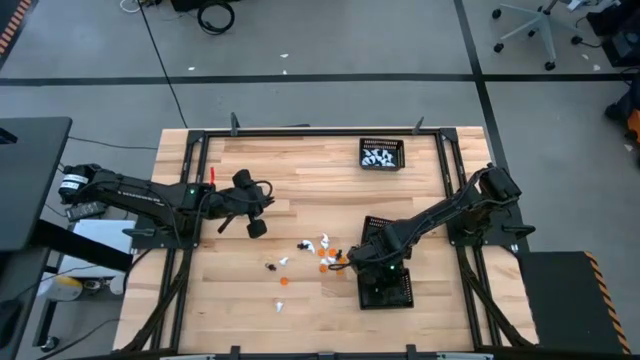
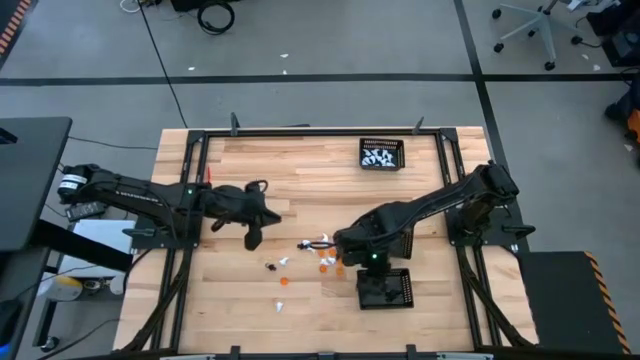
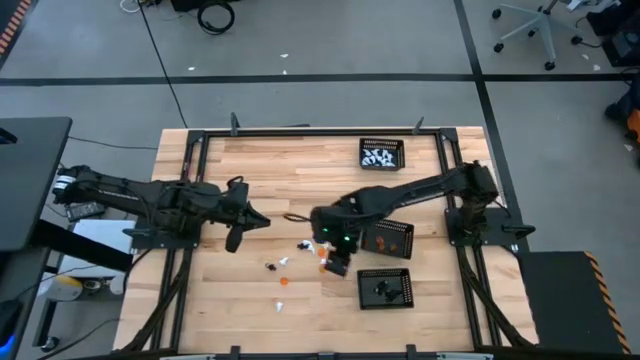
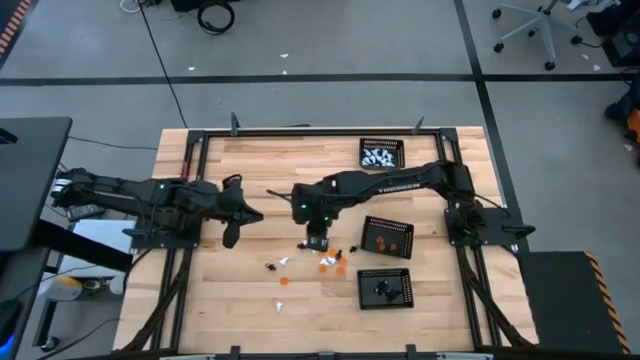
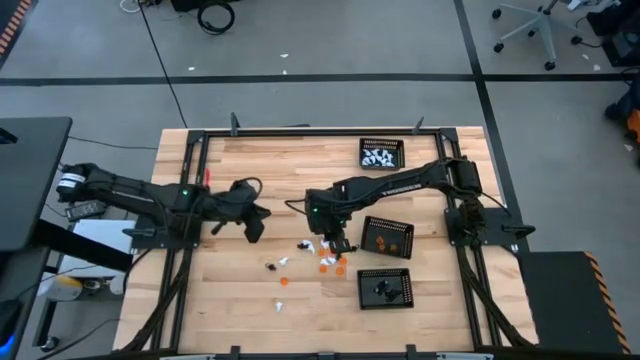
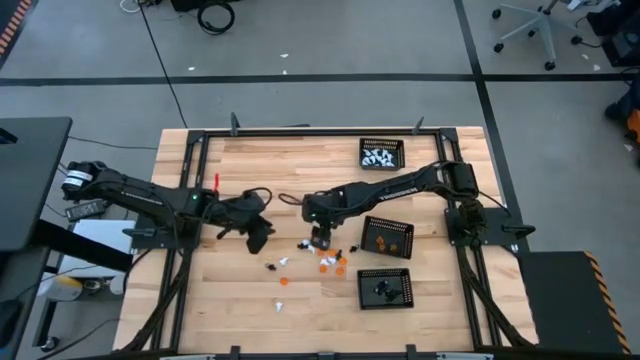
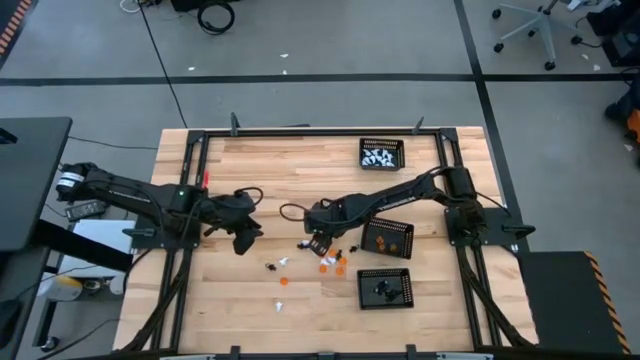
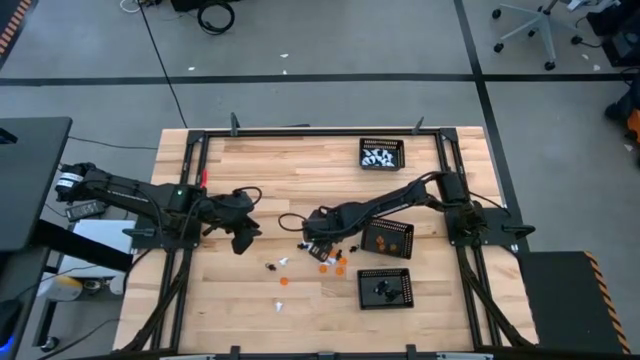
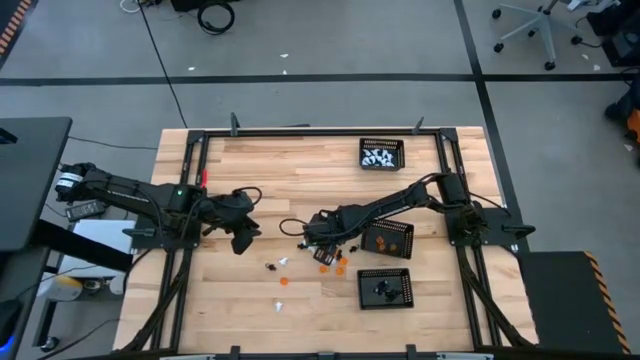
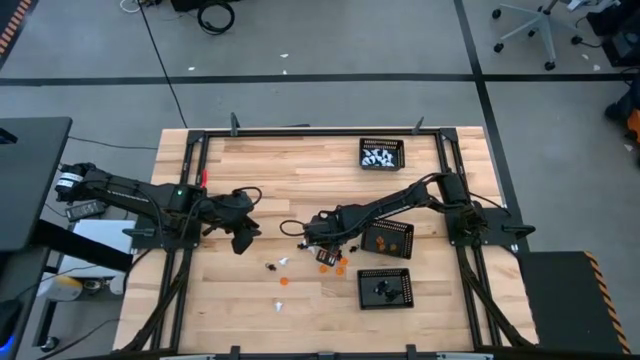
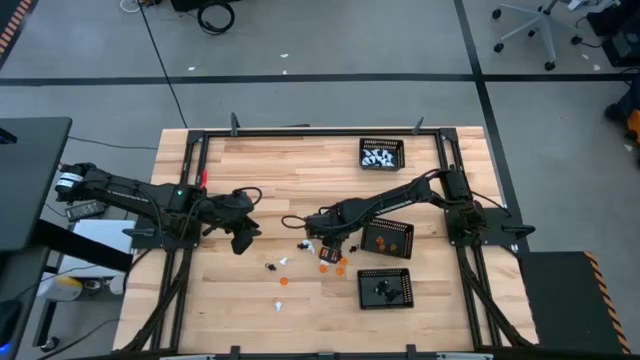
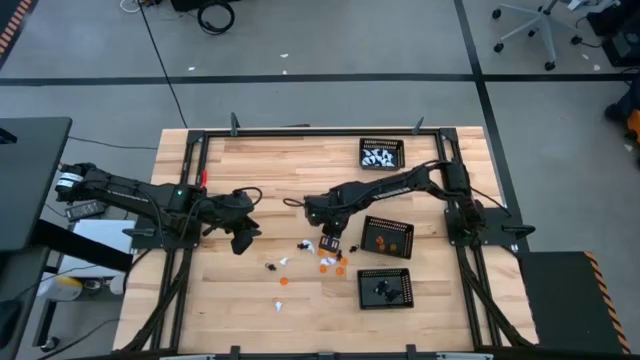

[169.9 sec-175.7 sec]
Task: Sort Halloween decoration
Put the white ghost toy into the top black bin

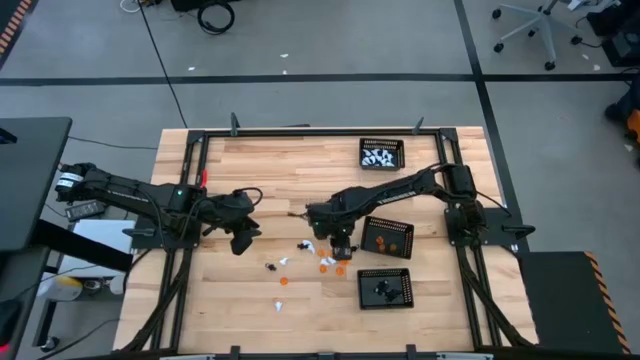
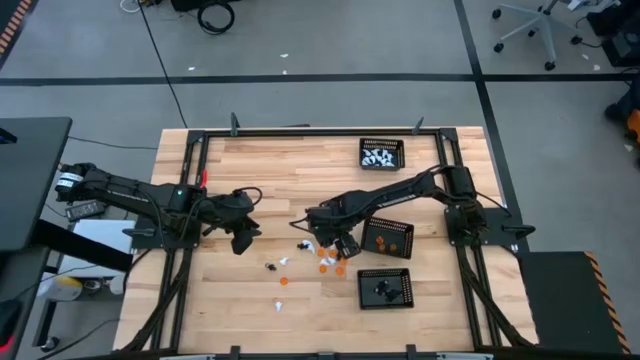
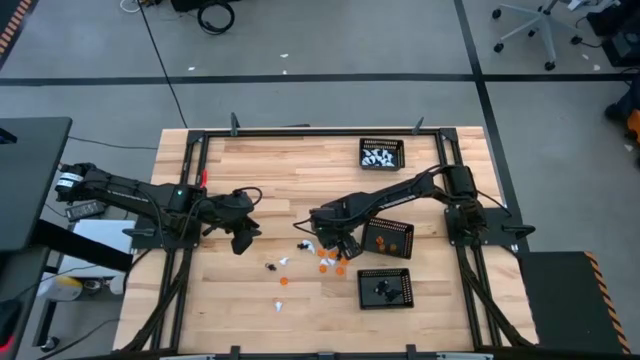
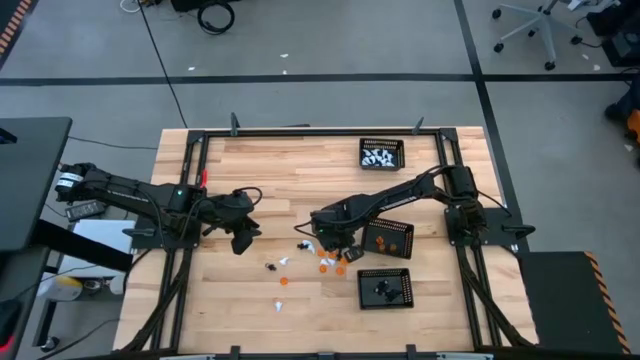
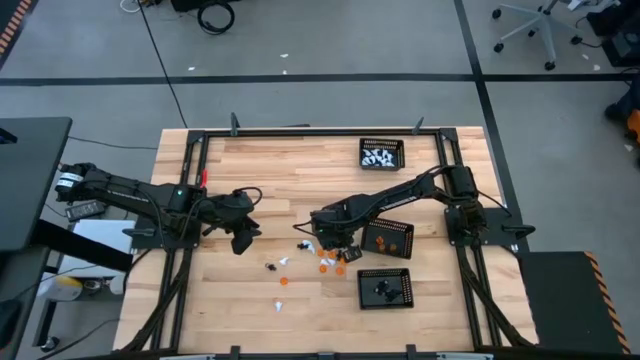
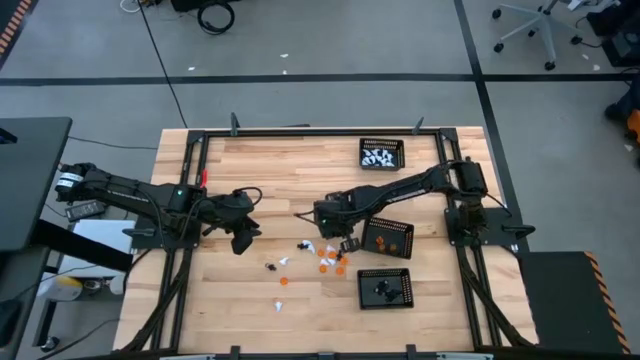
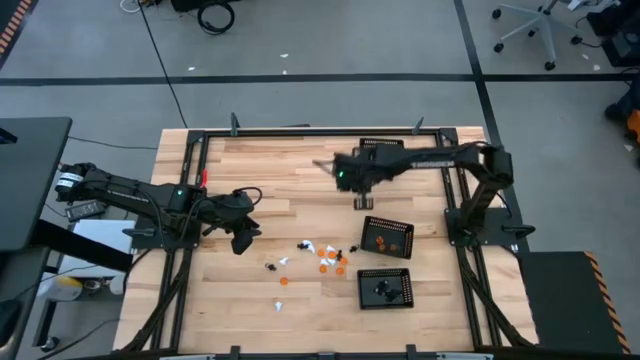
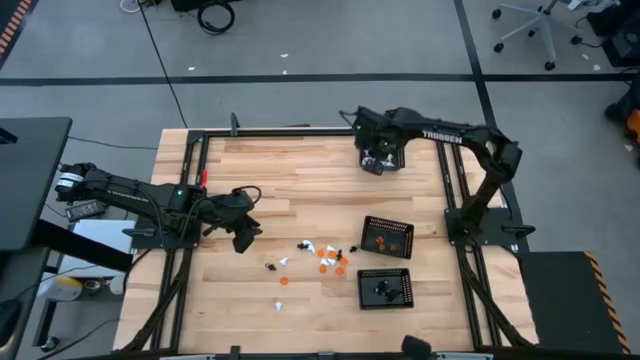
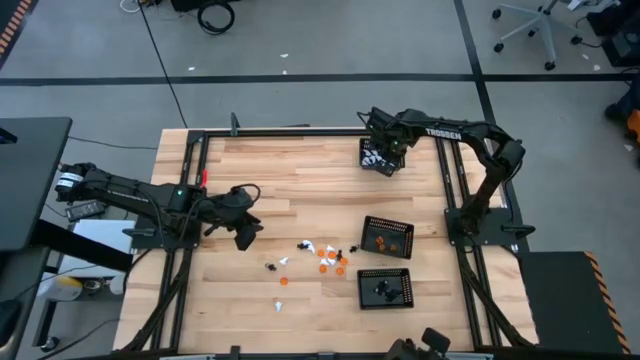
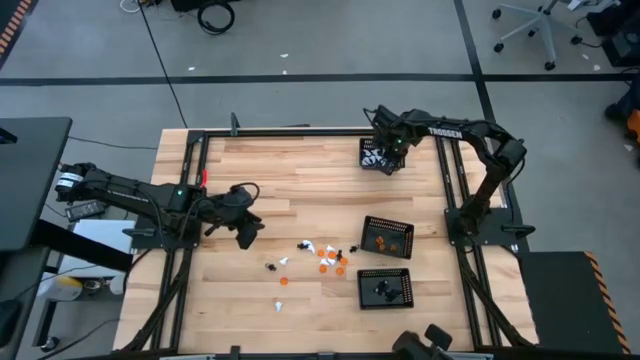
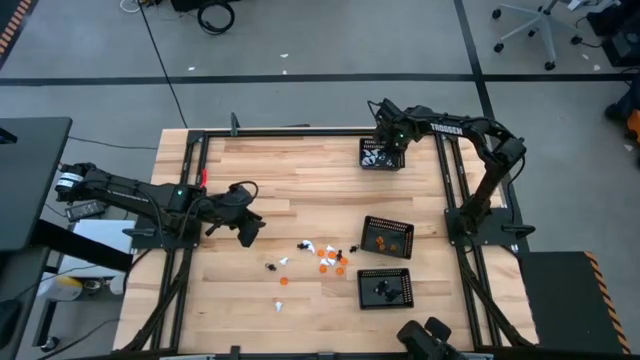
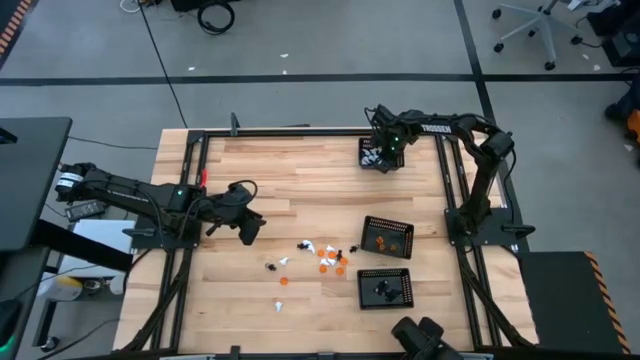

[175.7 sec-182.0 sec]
Put the white ghost toy into the top black bin

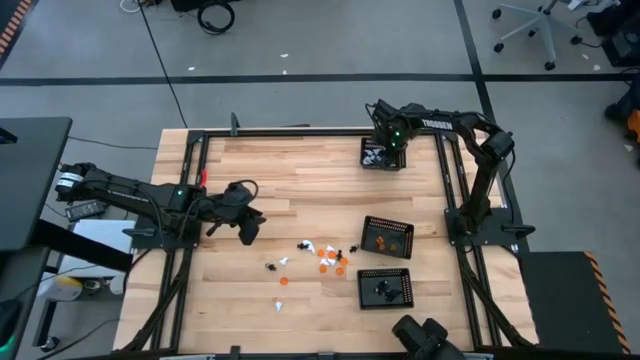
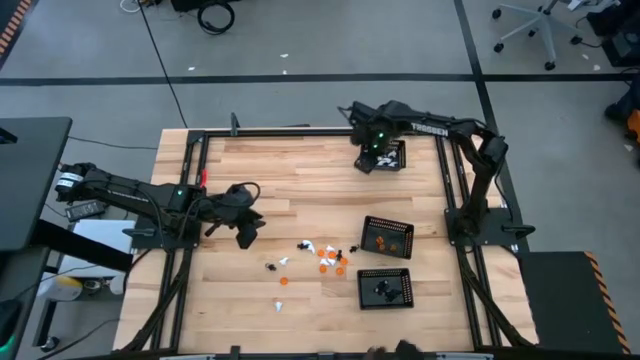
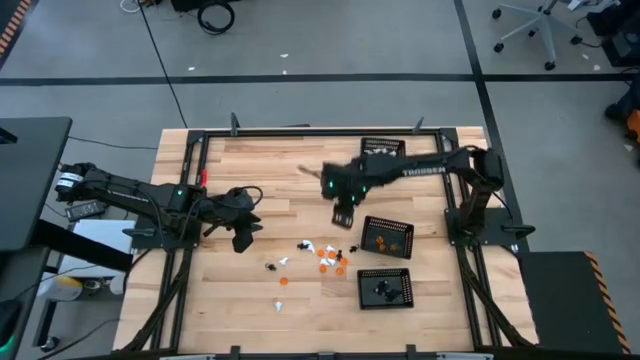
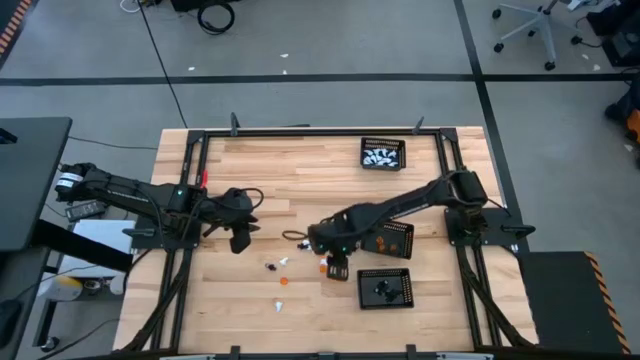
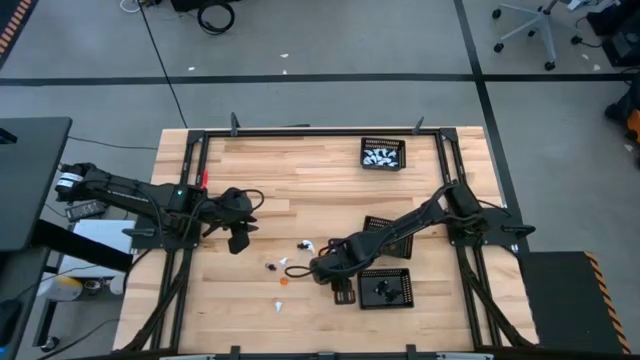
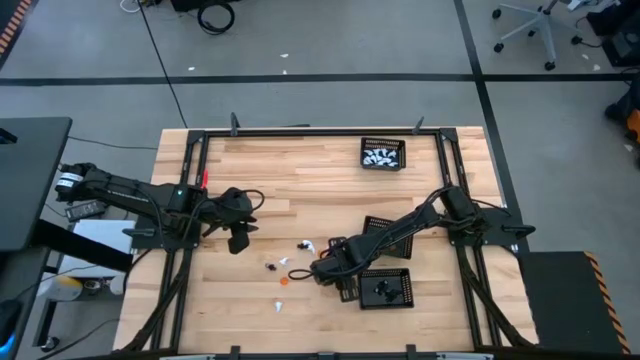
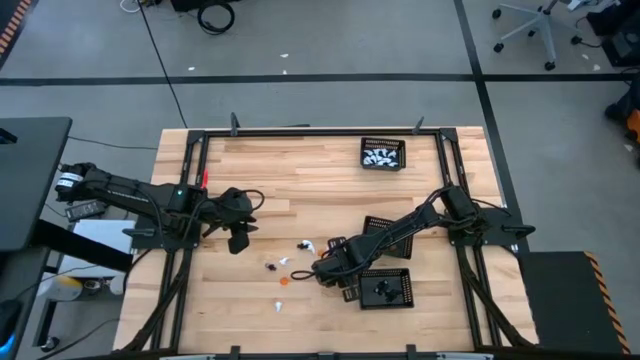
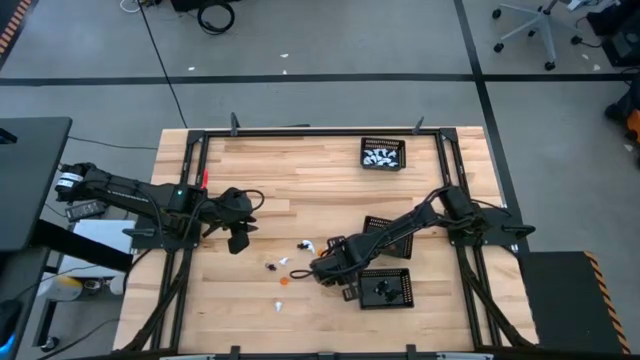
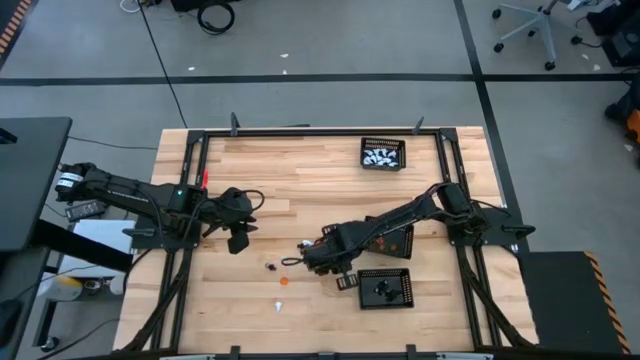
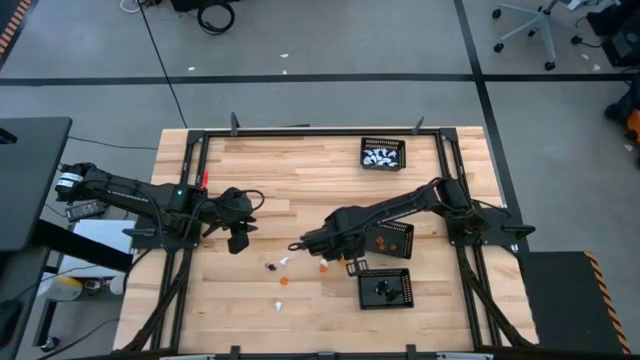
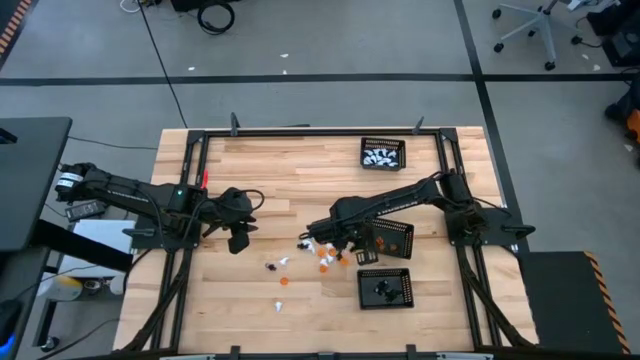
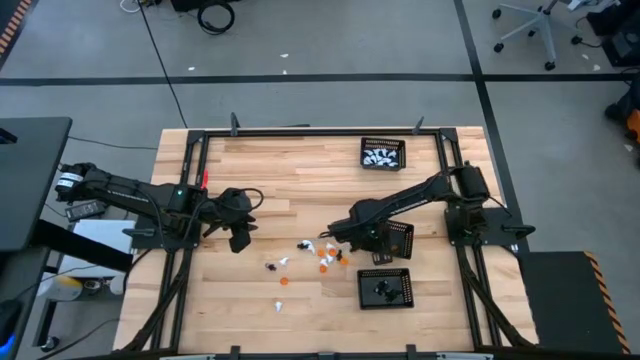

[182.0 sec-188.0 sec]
Put the orange pumpkin toy into the center black bin

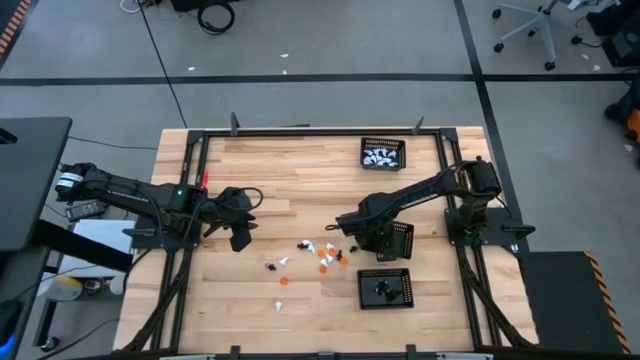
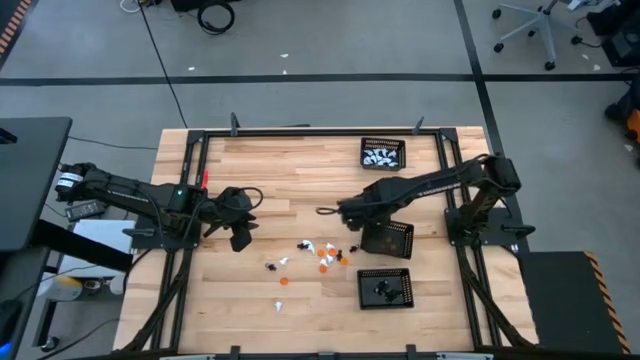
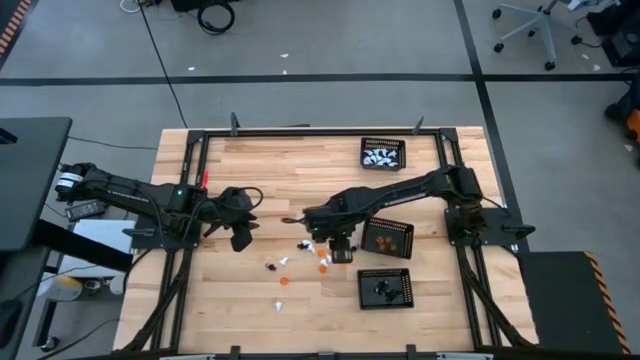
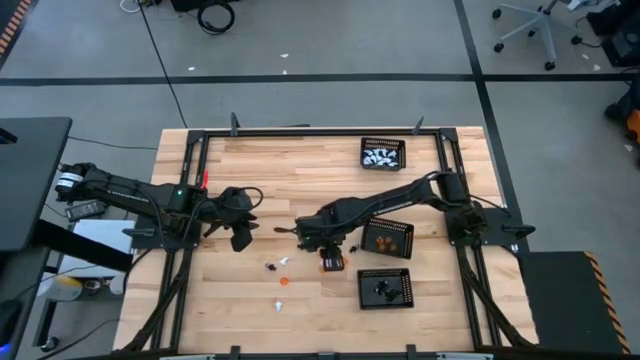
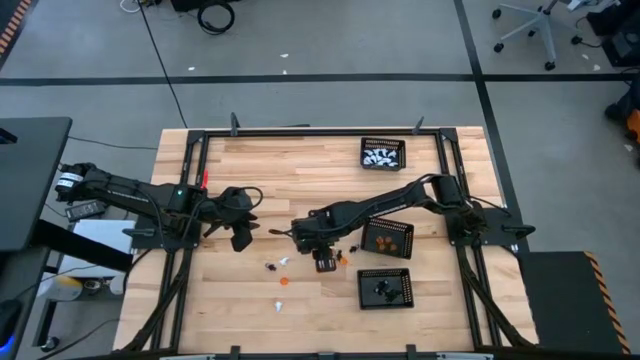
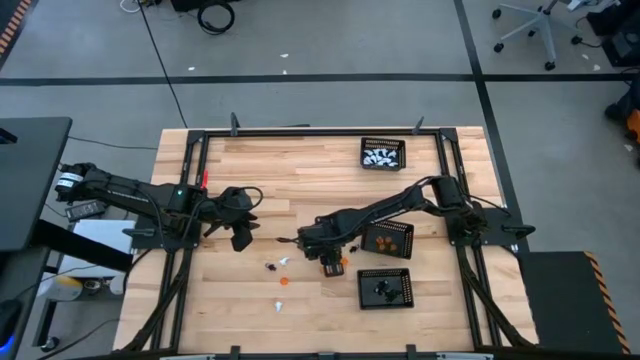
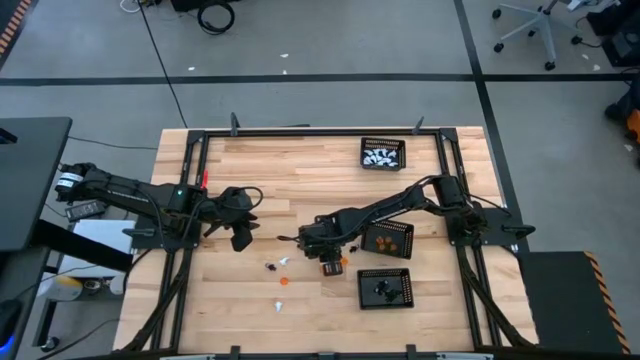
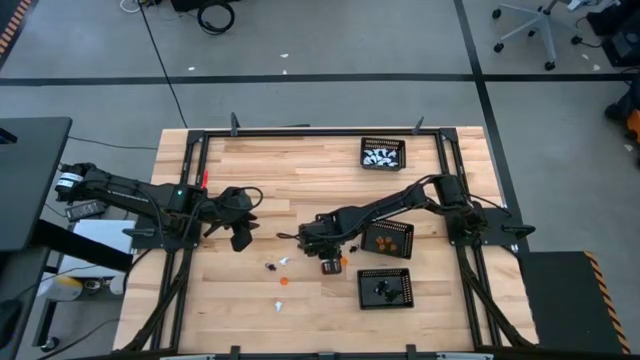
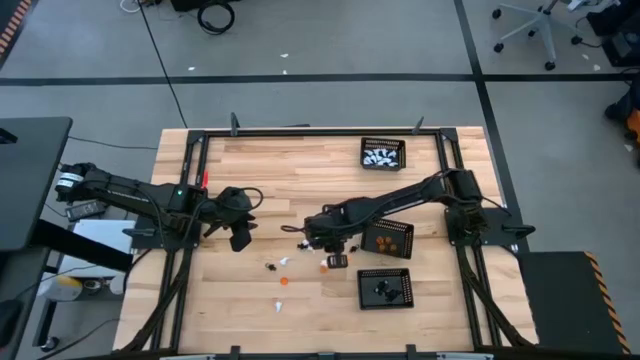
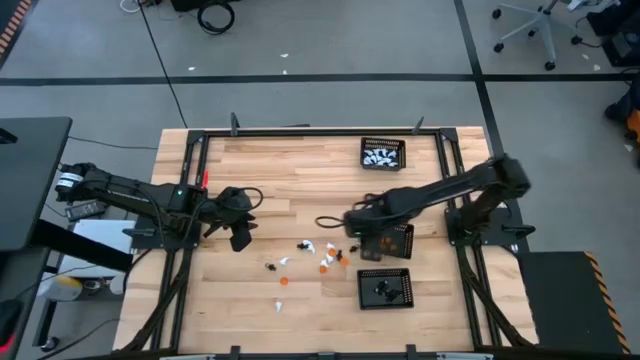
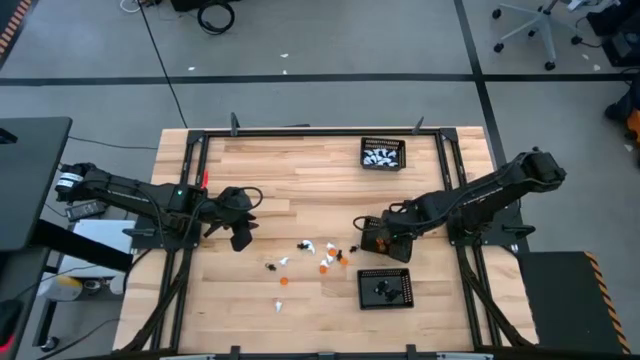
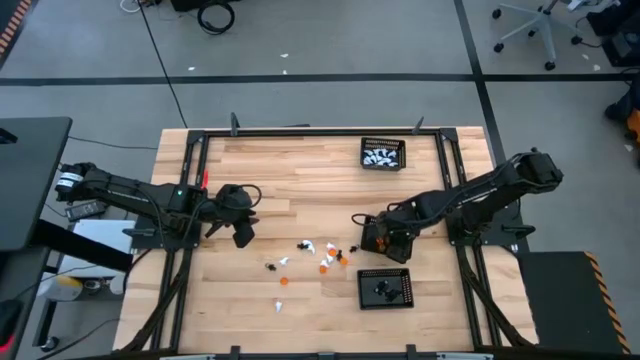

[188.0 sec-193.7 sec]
Put the orange pumpkin toy into the center black bin
